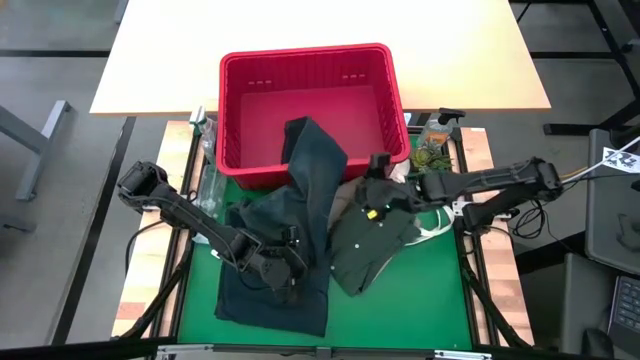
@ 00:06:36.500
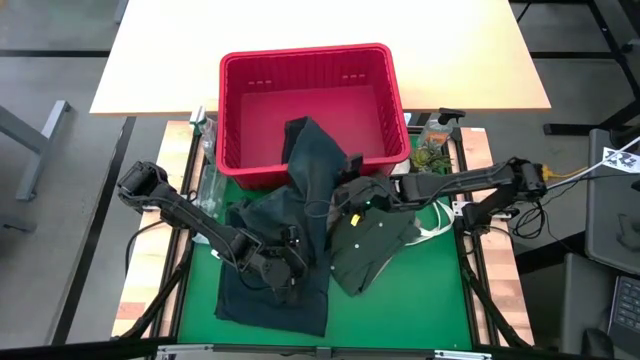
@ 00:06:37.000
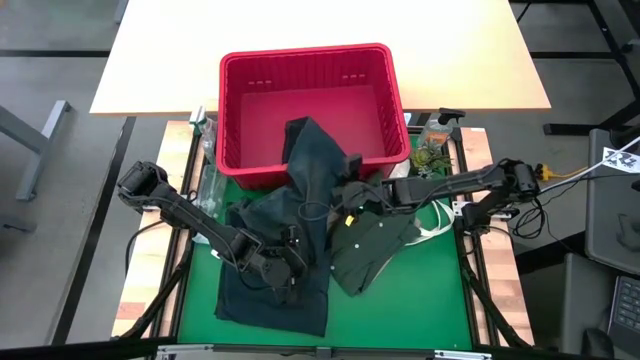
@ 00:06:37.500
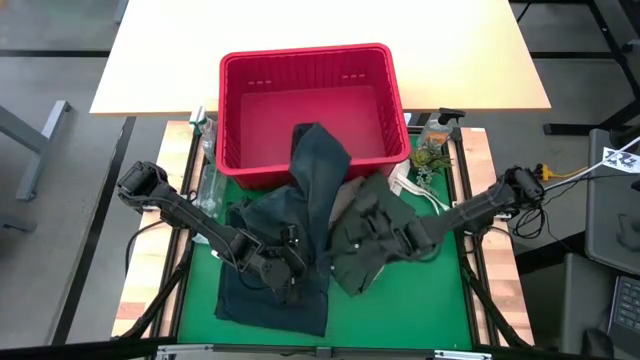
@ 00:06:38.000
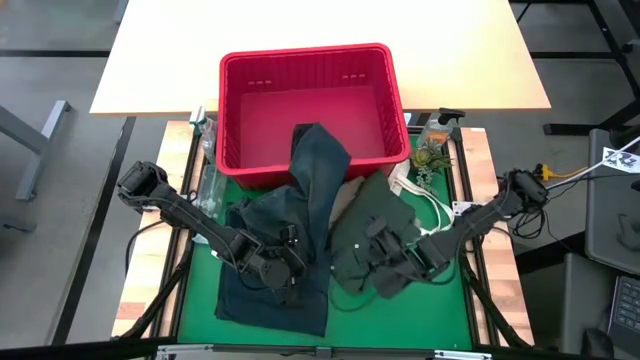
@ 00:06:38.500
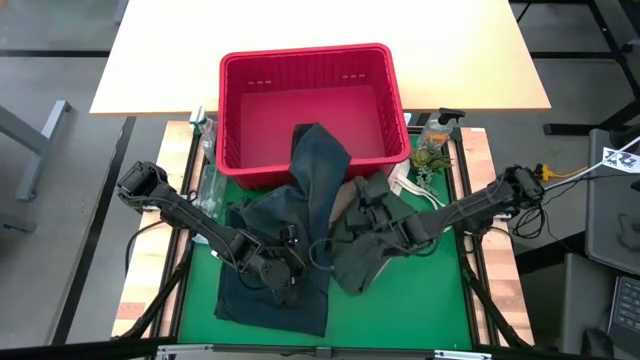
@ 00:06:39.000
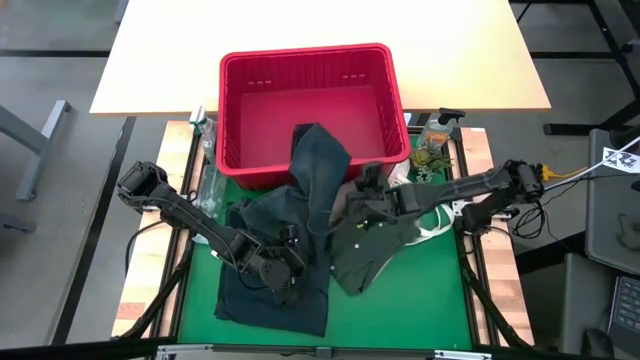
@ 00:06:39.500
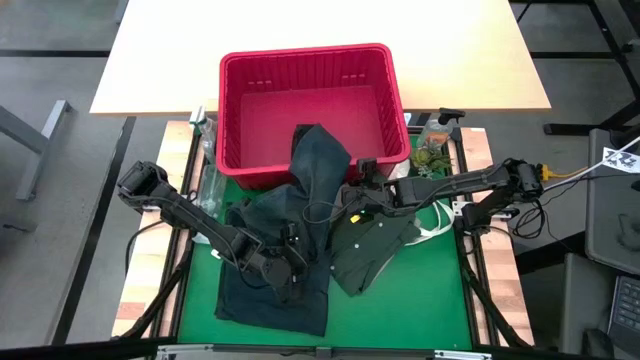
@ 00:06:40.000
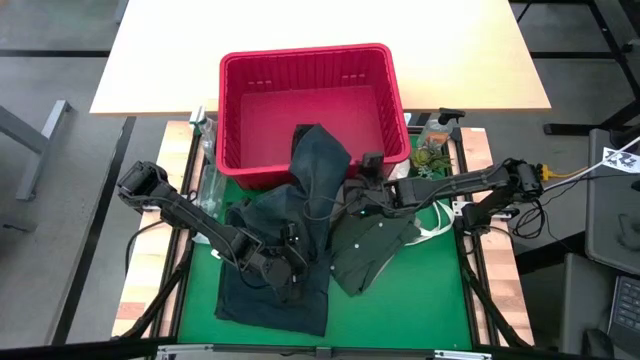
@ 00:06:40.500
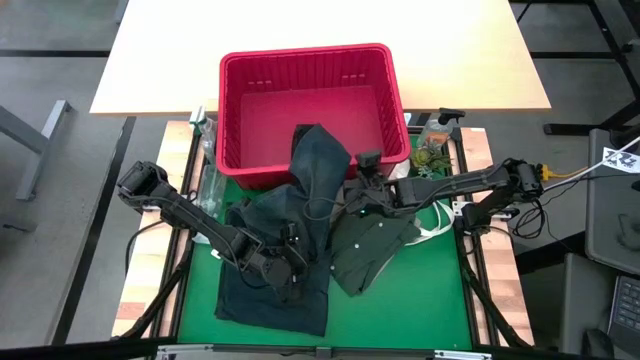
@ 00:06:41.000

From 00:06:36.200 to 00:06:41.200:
Task: Fold laundry
Fold the dark blue pants

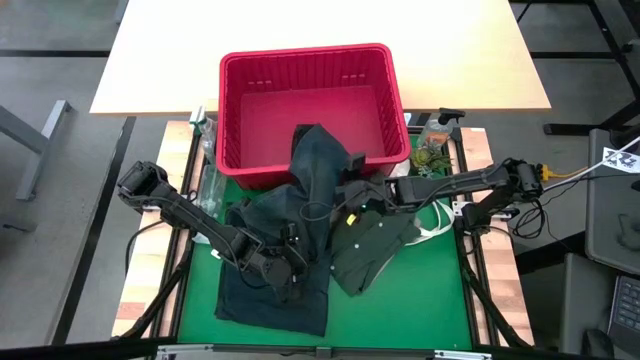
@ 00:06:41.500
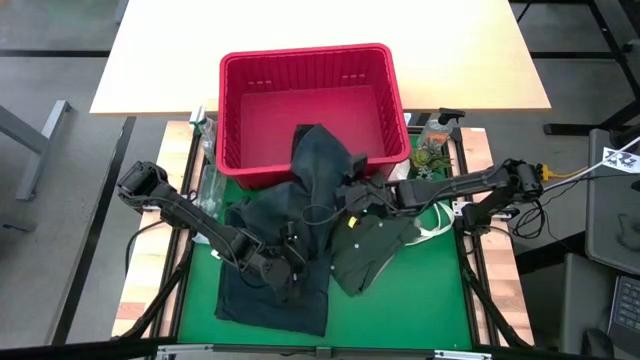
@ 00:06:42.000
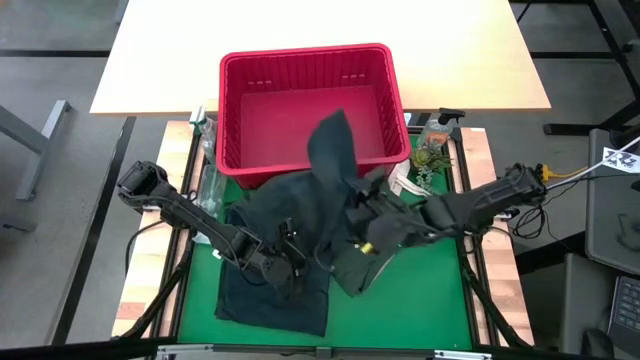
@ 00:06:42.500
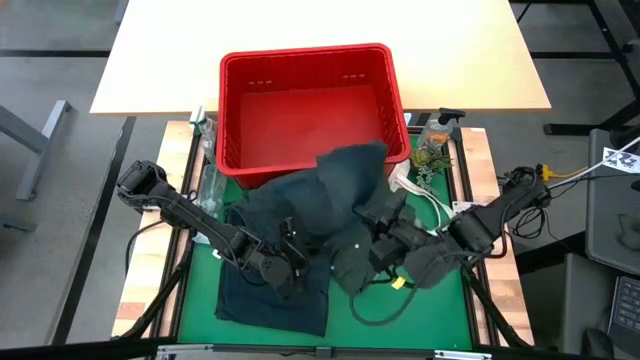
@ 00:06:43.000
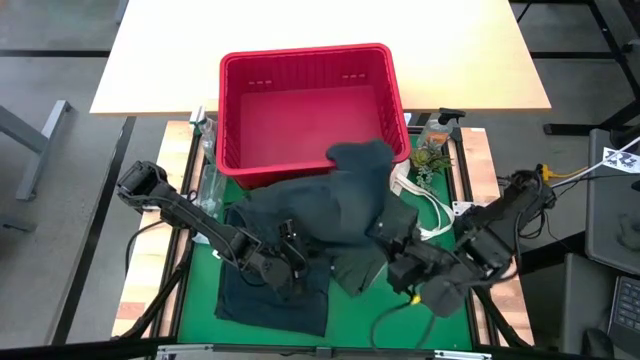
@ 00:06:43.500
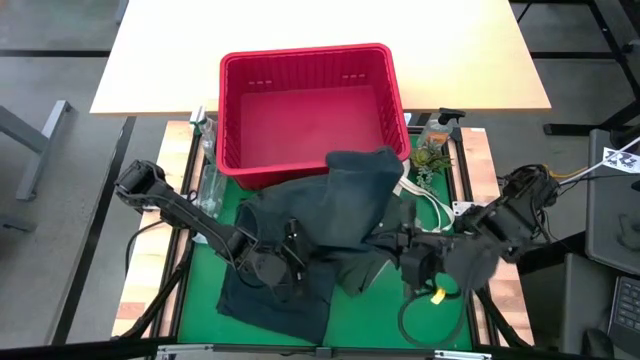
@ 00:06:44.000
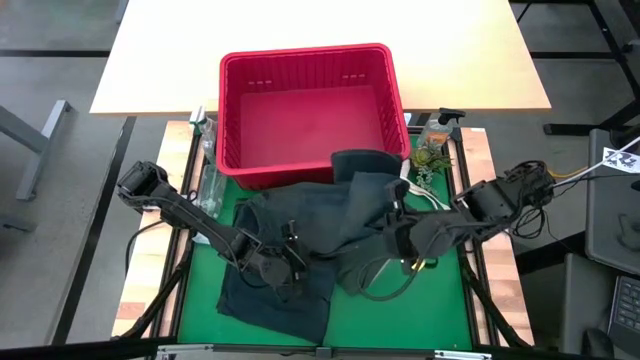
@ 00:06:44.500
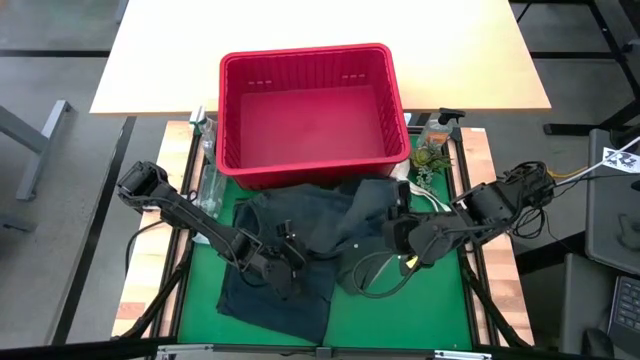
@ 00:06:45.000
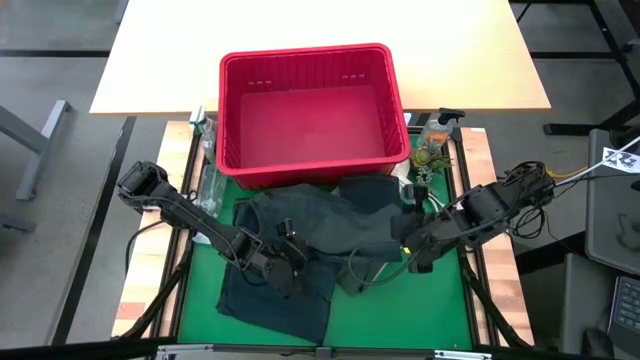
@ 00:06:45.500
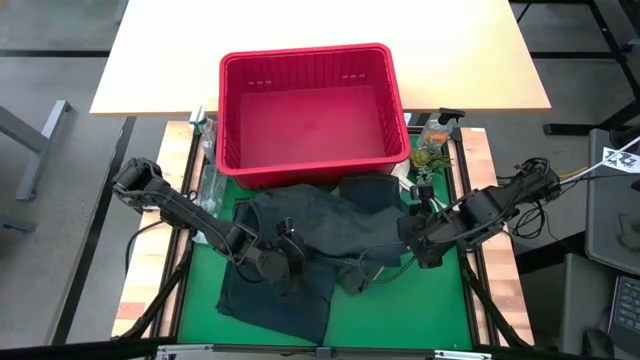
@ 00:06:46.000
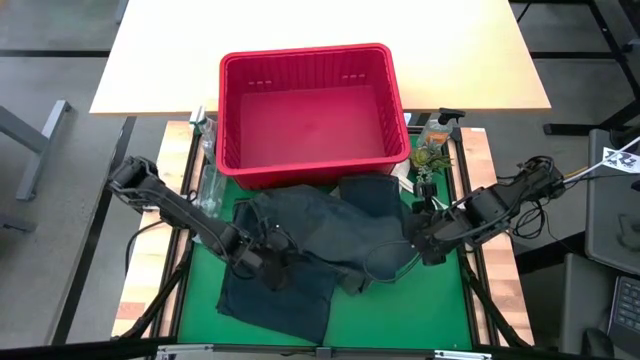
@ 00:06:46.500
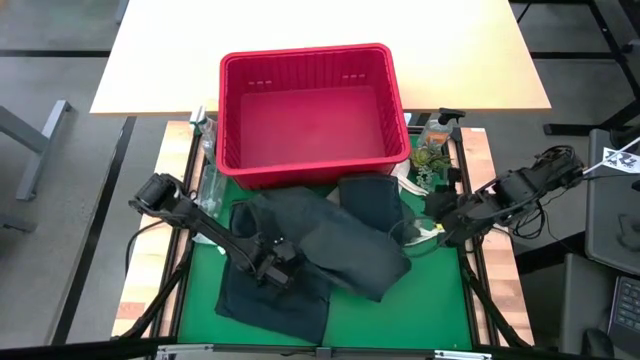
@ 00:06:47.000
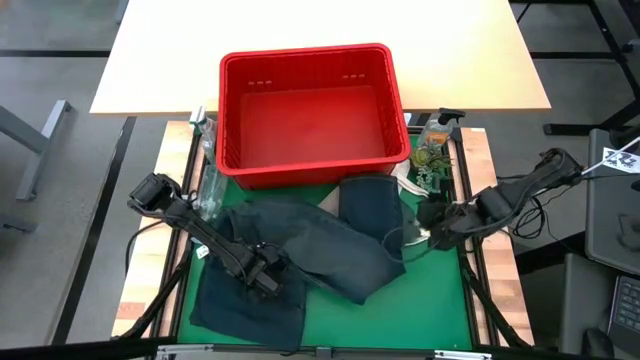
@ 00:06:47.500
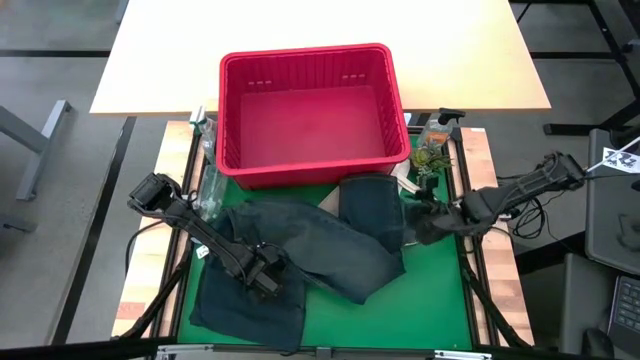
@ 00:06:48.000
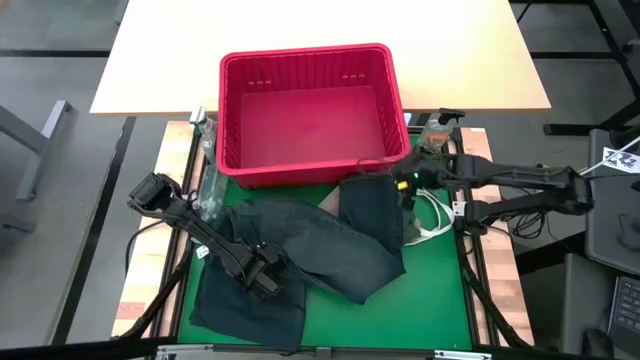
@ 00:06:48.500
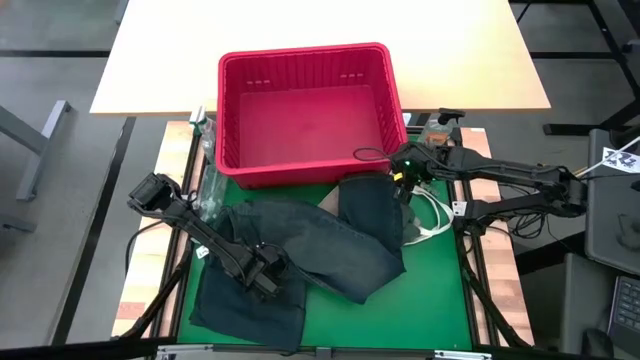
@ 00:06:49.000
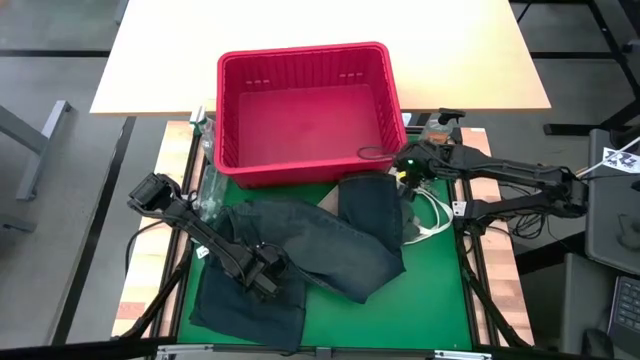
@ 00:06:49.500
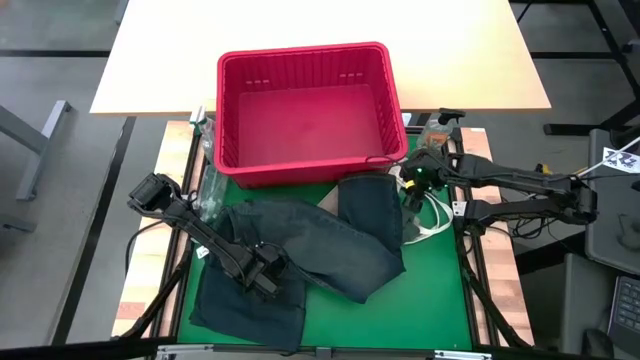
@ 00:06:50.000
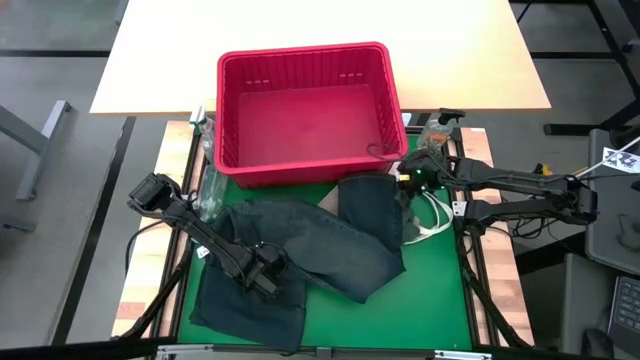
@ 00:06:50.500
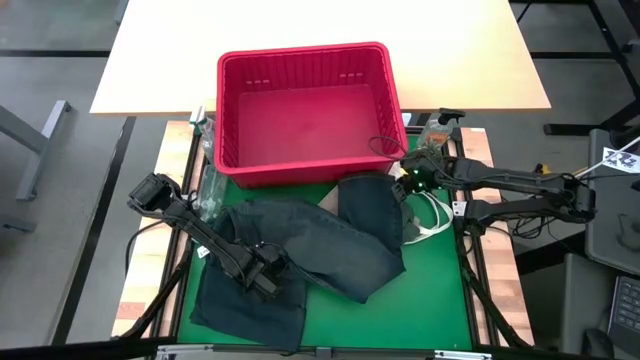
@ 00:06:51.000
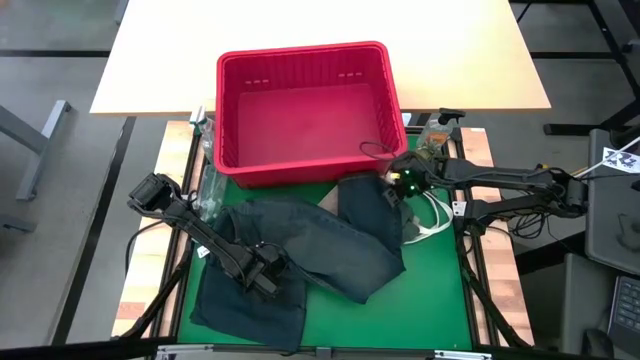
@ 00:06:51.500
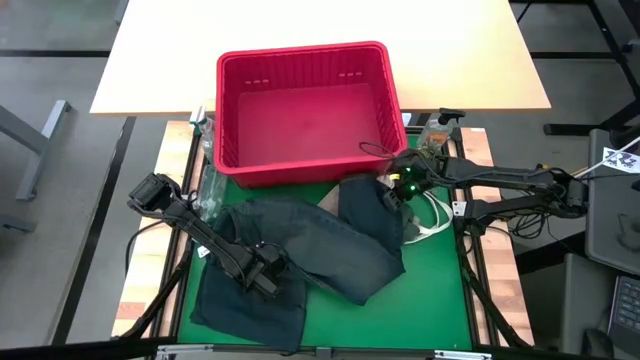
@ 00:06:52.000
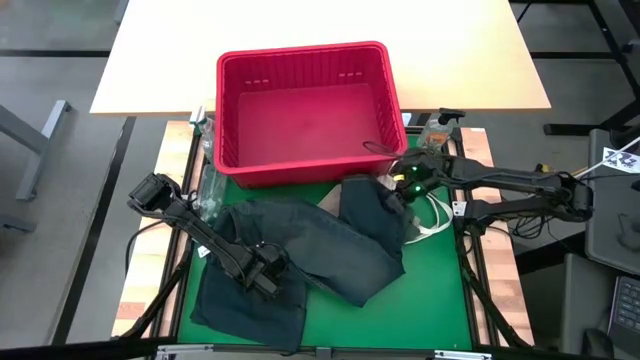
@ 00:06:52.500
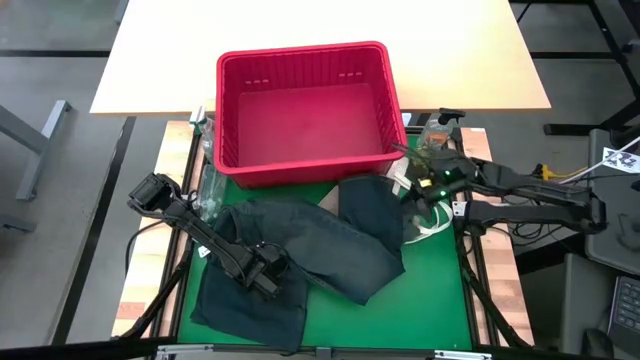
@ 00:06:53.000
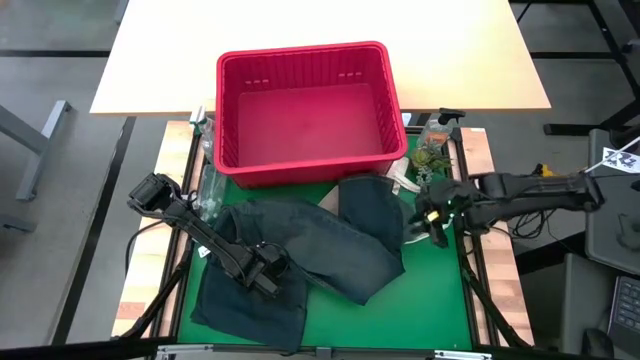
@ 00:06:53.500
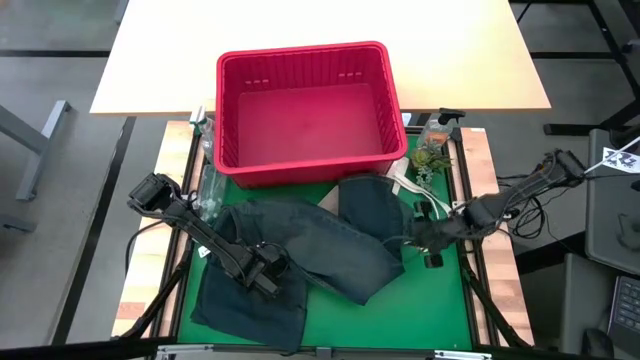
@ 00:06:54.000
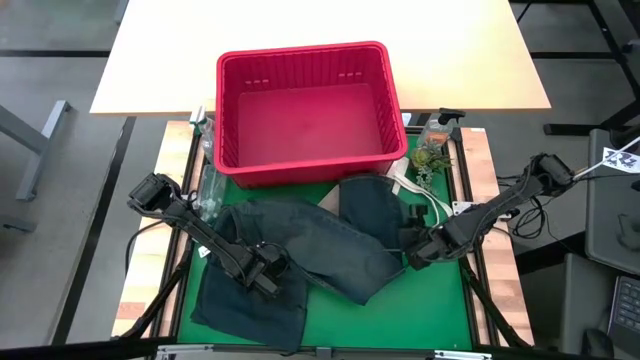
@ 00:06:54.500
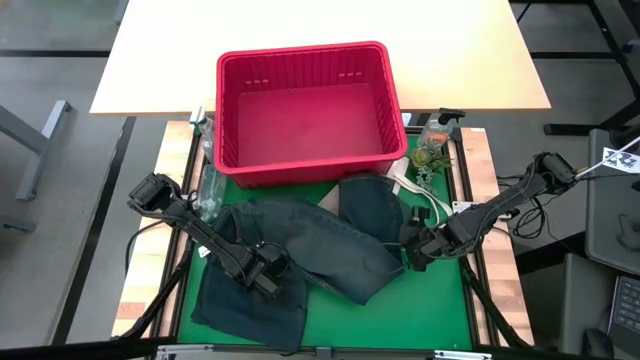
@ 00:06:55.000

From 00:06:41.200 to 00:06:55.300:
Fold the dark blue pants
